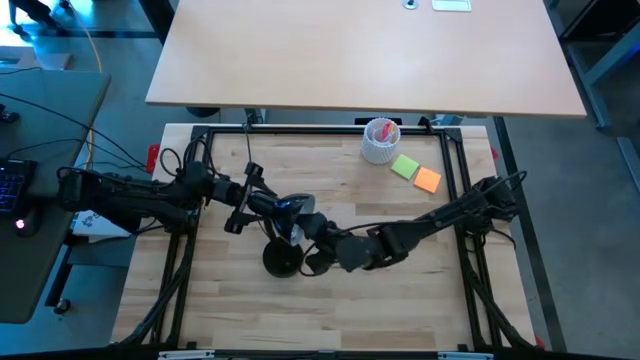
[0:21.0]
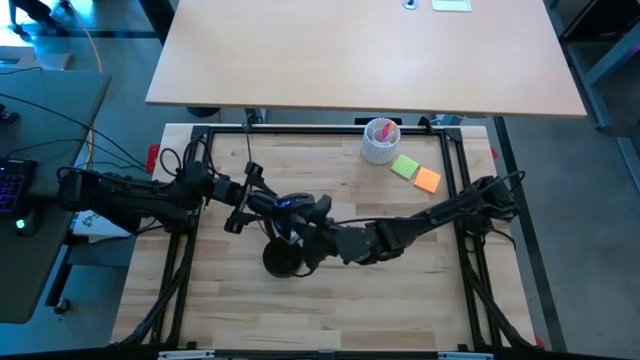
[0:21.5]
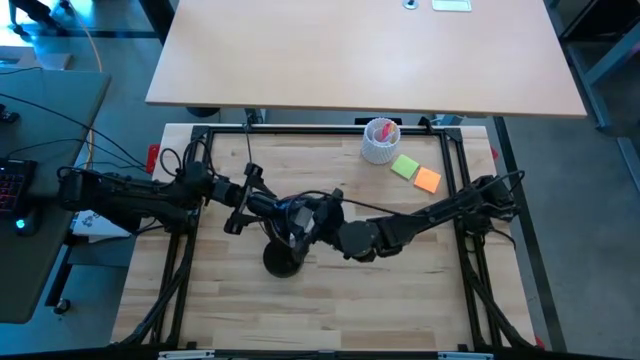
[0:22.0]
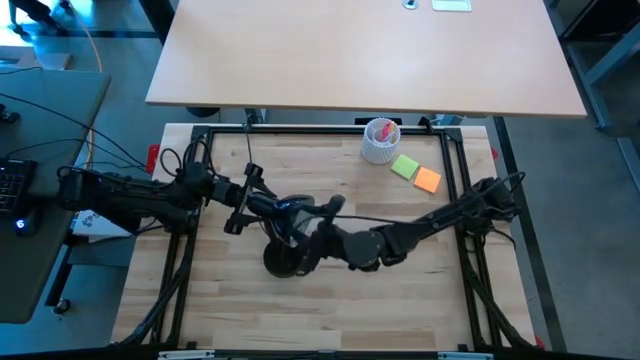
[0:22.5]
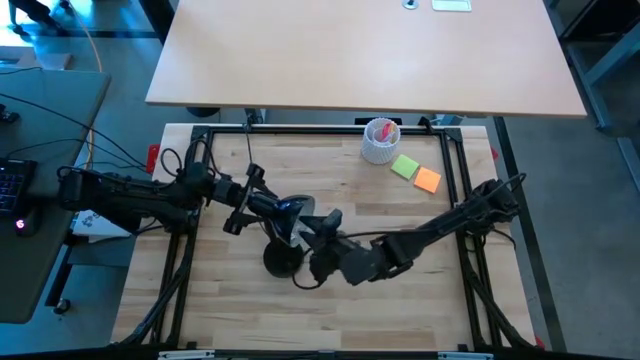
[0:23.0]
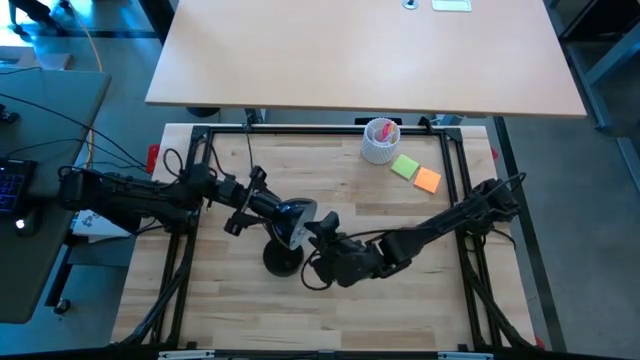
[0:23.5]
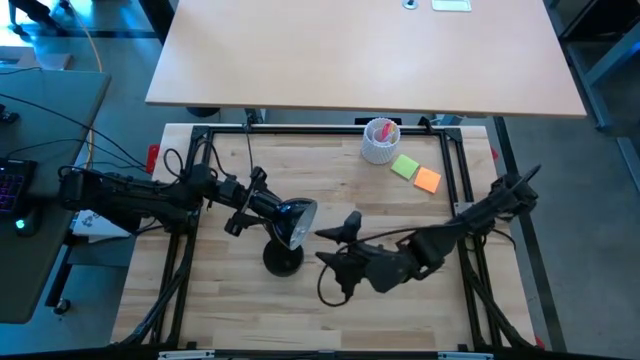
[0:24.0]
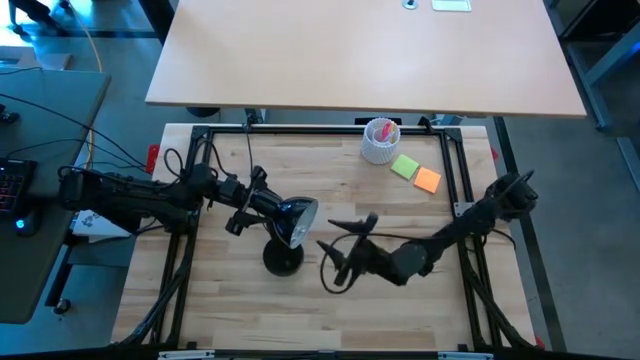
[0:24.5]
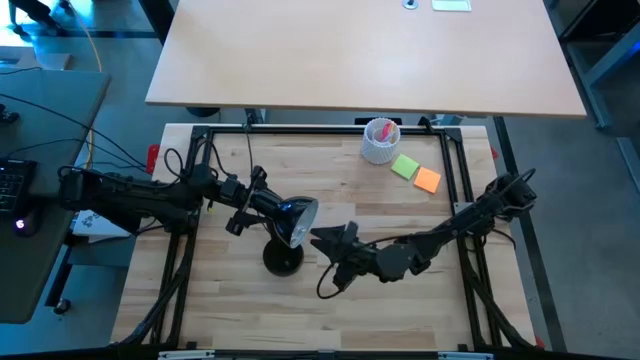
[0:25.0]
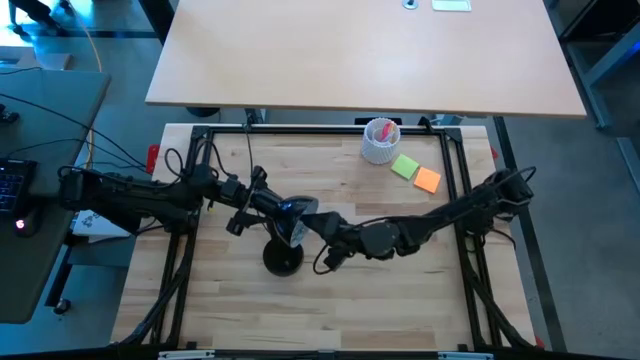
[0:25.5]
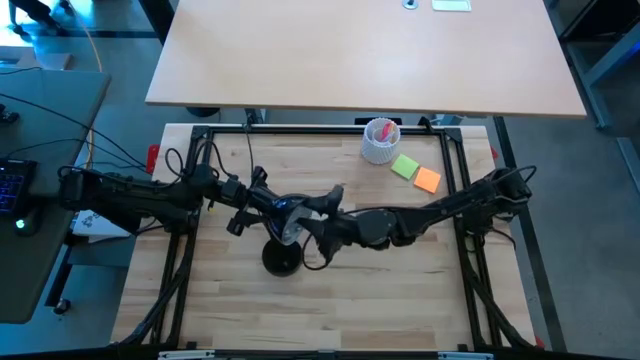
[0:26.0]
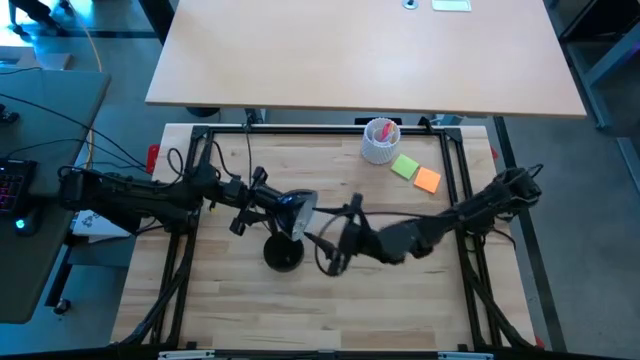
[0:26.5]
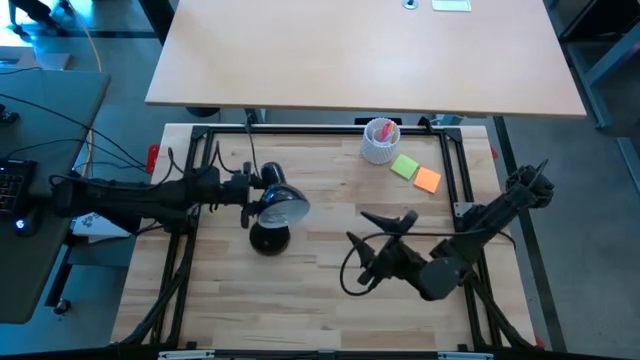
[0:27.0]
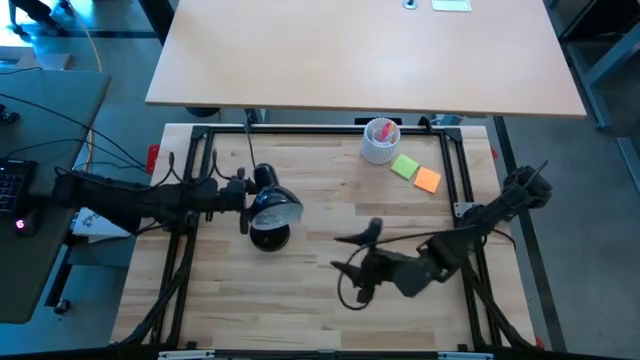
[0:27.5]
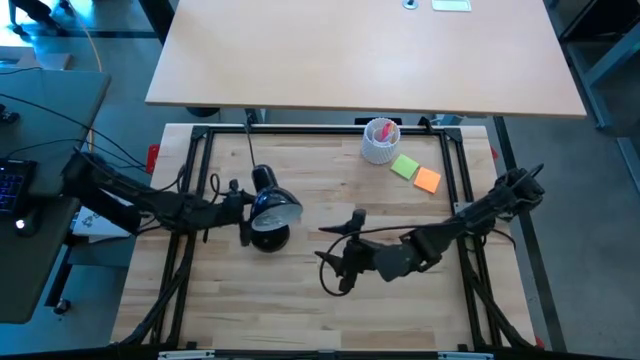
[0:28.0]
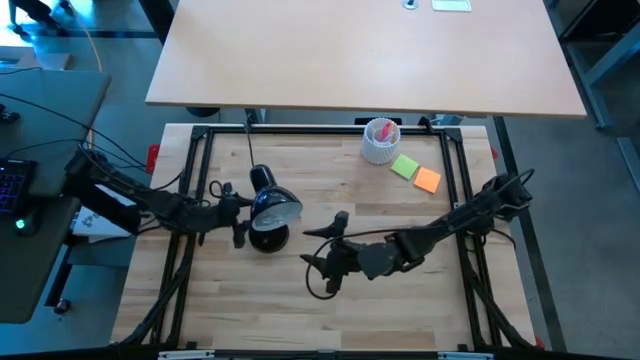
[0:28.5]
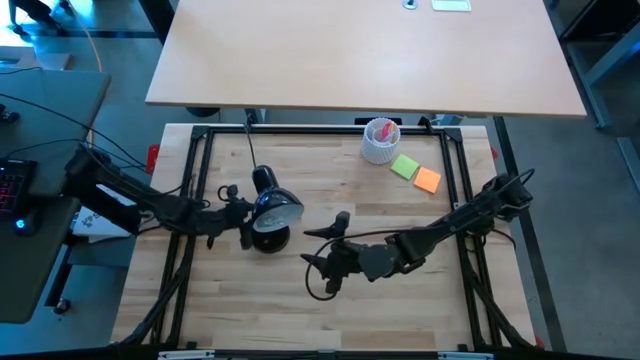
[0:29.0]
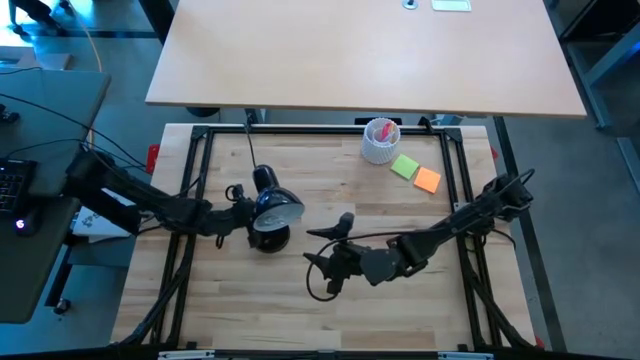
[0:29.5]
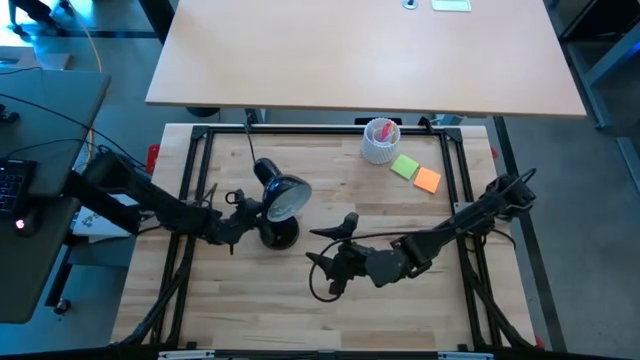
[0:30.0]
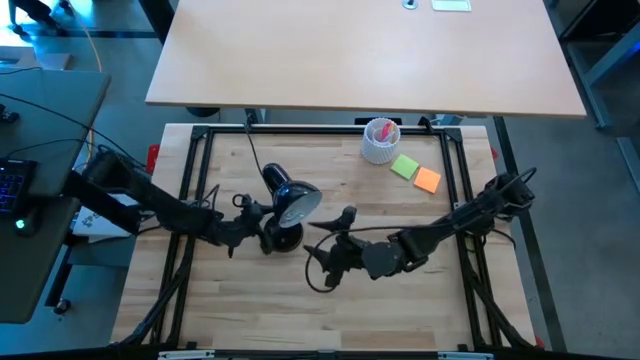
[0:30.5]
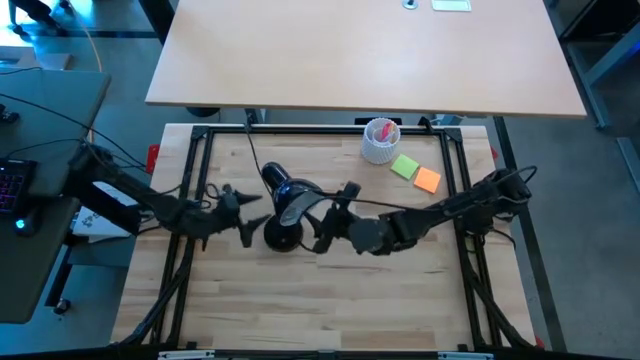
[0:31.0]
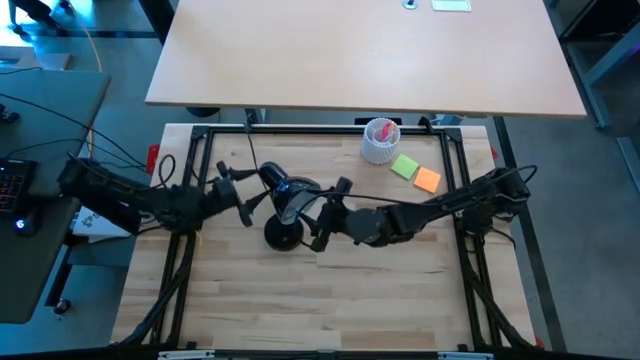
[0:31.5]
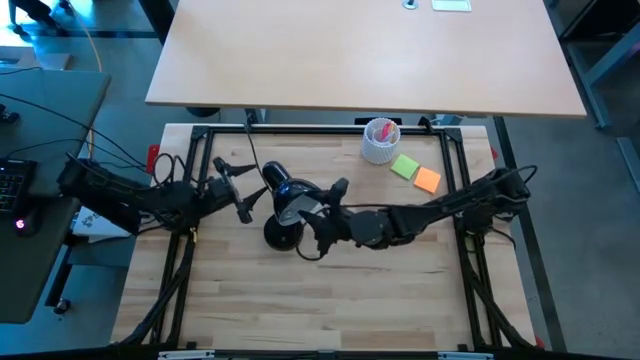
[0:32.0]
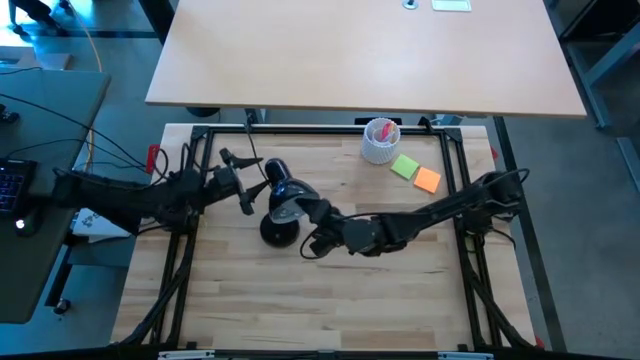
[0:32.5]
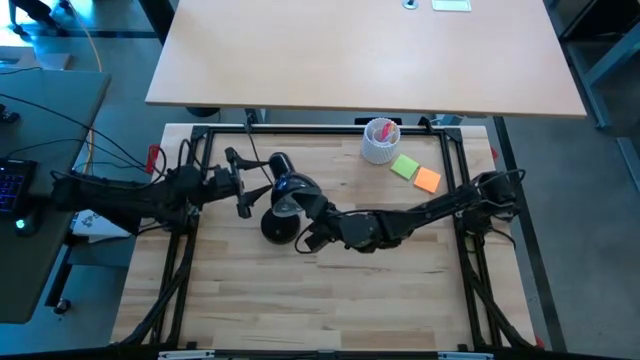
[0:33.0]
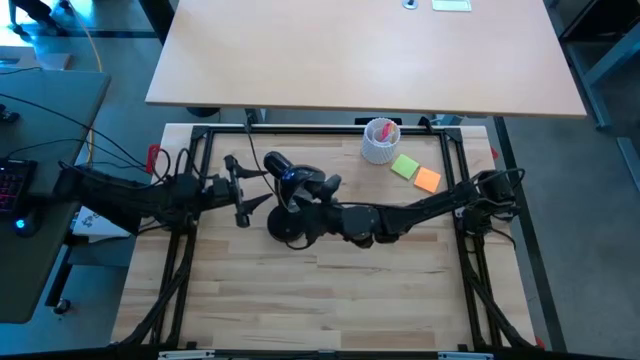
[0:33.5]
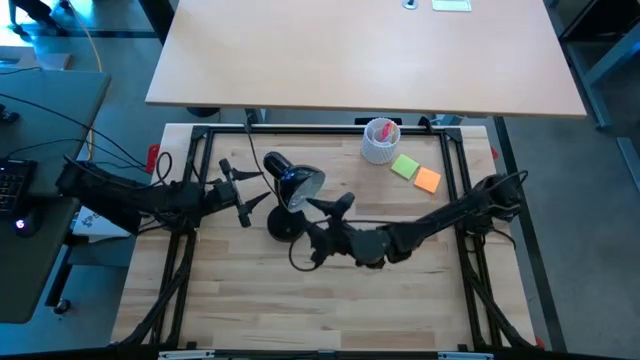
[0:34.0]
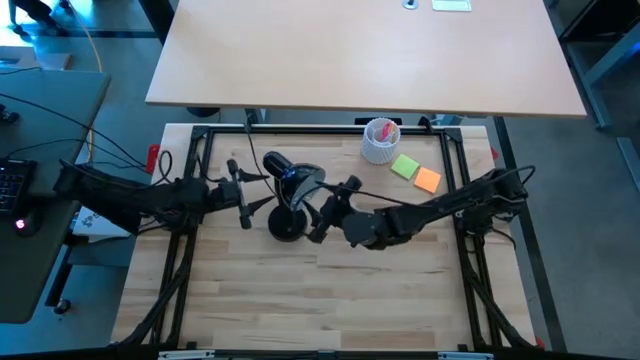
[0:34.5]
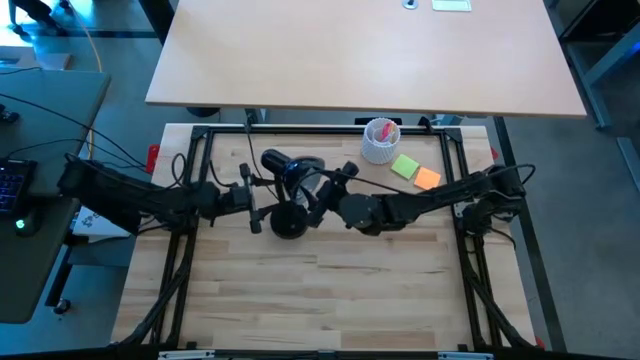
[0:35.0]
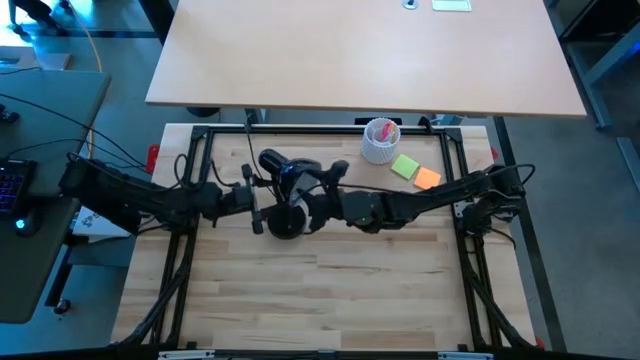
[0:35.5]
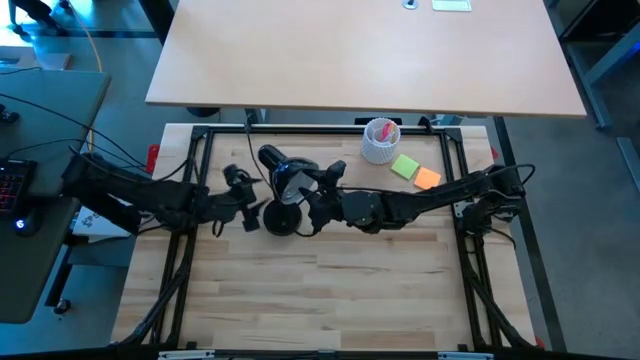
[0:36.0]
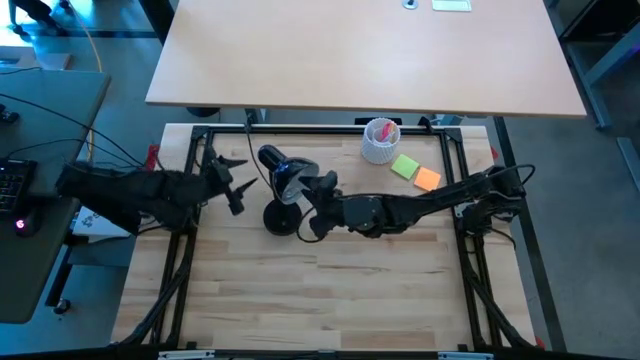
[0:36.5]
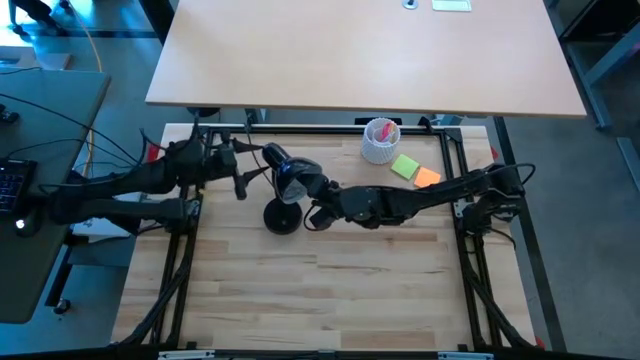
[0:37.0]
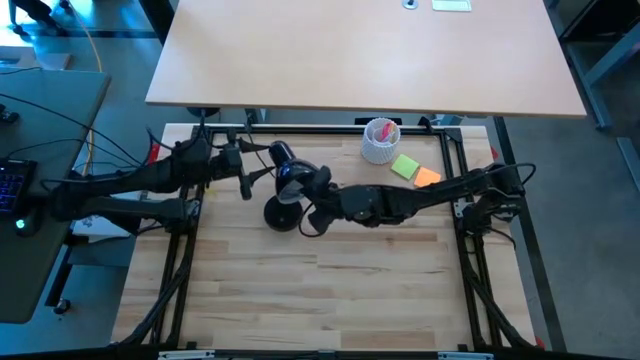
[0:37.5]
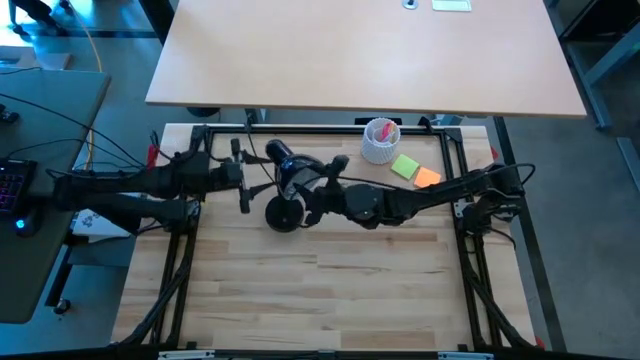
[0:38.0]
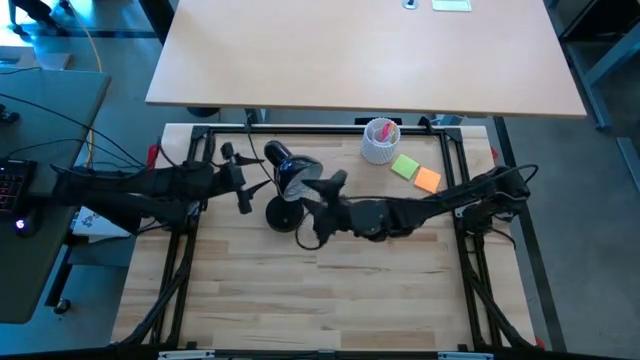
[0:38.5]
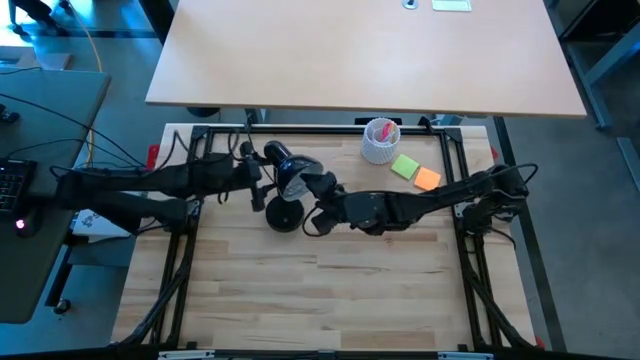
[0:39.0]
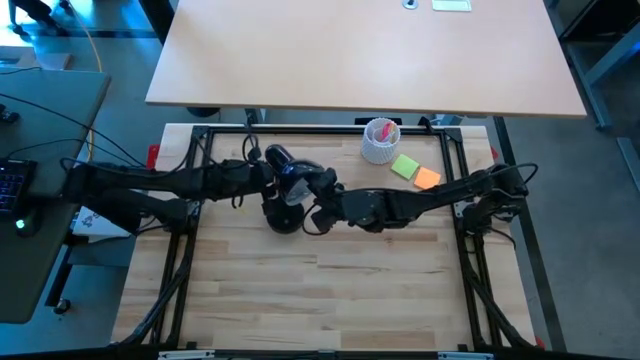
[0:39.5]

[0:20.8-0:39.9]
Task: Screw lightbulb
Insert the lightbulb into the lamp

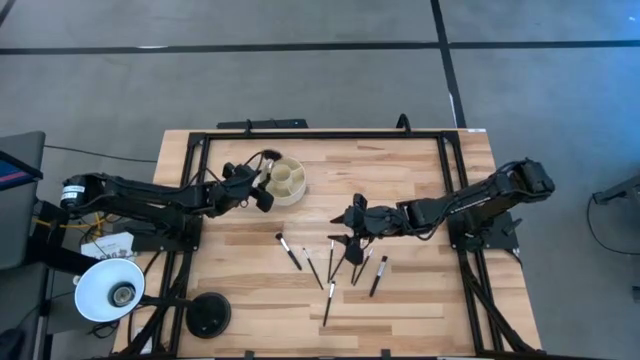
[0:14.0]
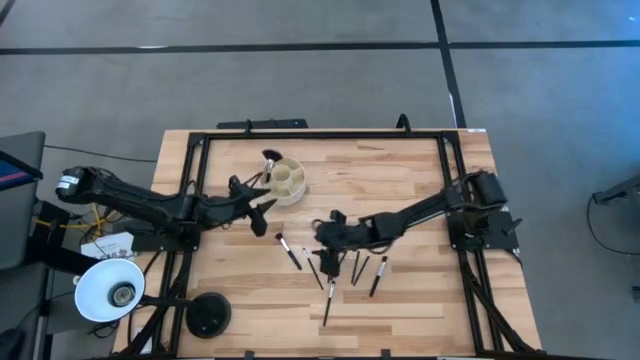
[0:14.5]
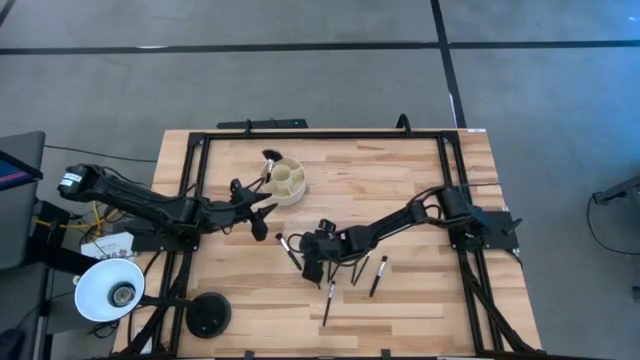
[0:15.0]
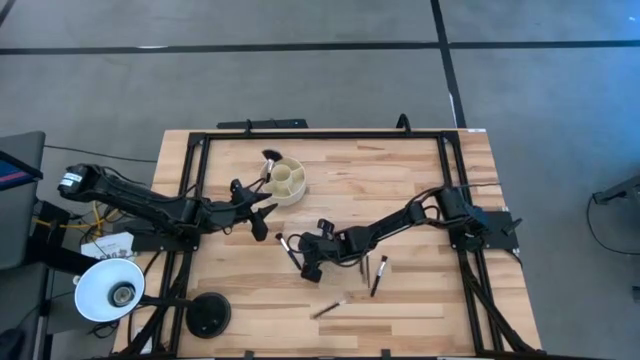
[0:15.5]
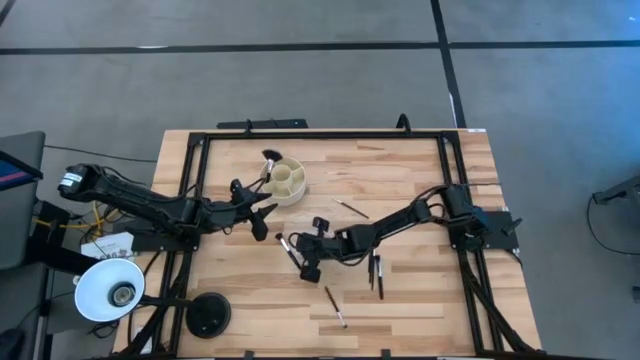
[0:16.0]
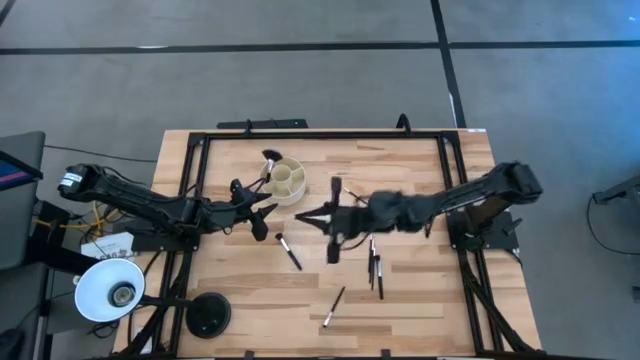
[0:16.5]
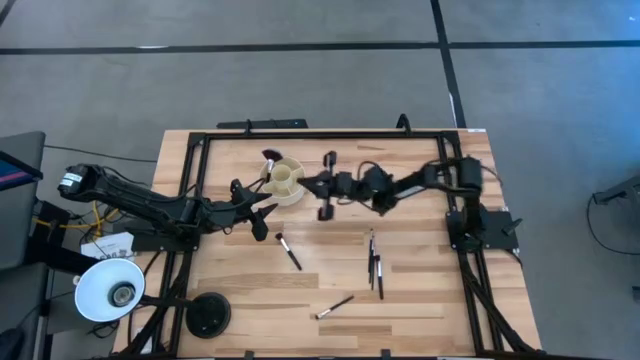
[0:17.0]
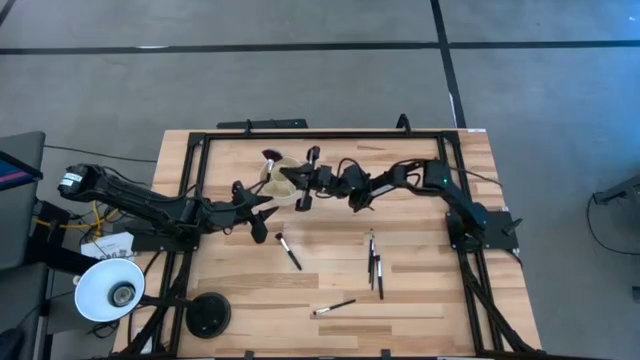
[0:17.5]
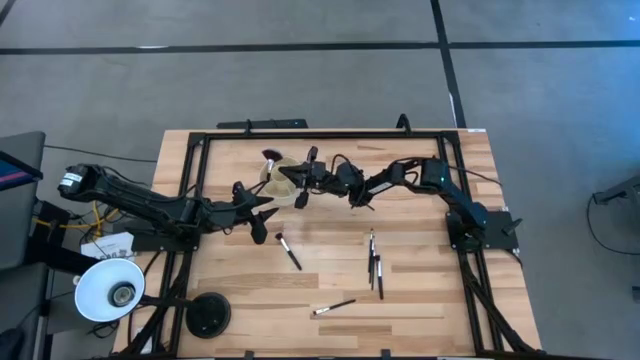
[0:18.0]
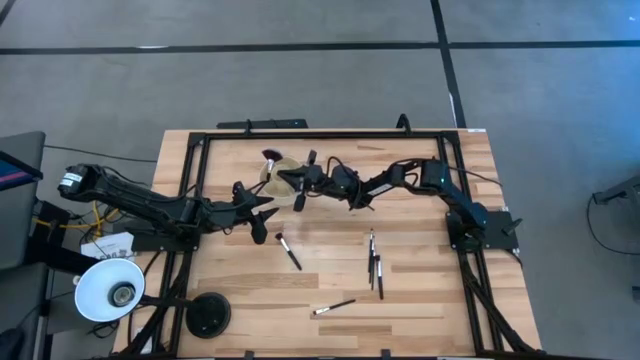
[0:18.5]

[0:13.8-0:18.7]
Task: Sort items
Put the black eyeshadow brush in the white organizer
